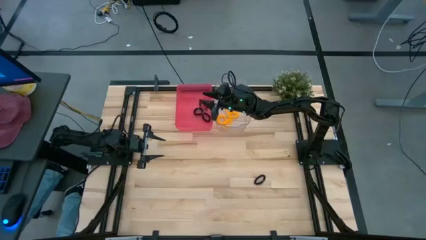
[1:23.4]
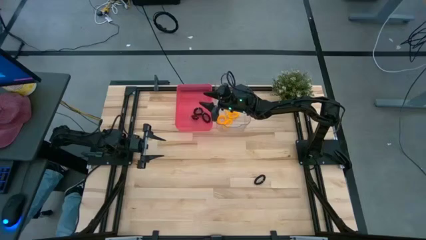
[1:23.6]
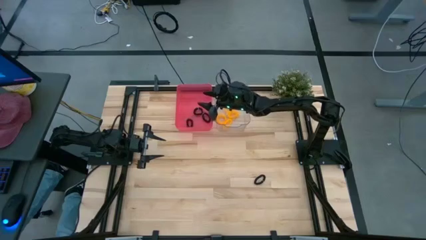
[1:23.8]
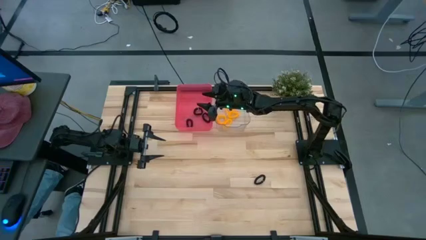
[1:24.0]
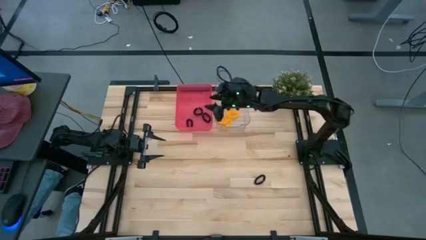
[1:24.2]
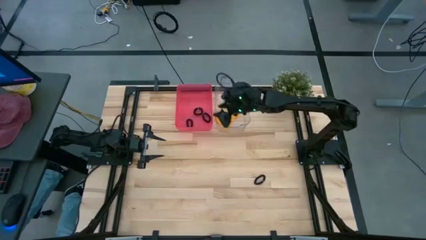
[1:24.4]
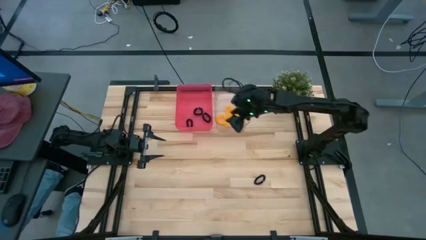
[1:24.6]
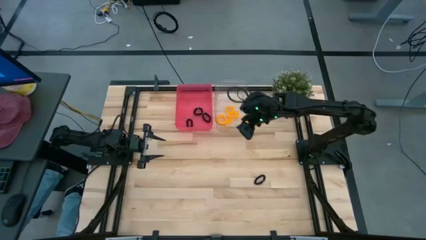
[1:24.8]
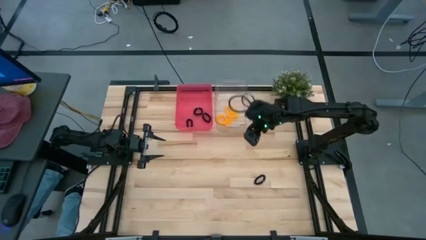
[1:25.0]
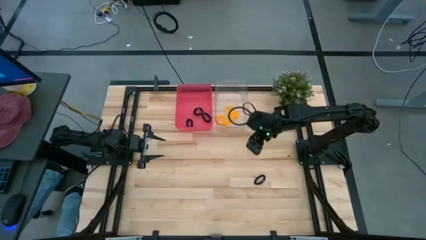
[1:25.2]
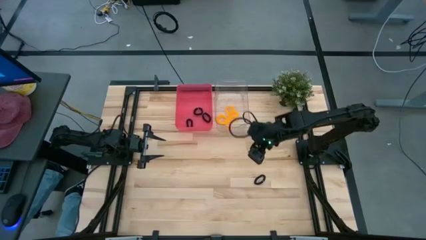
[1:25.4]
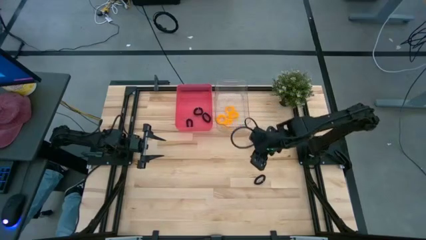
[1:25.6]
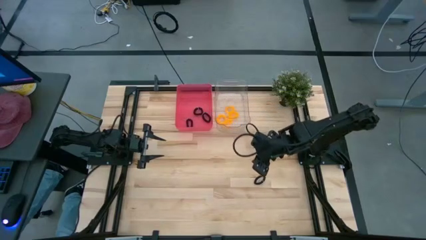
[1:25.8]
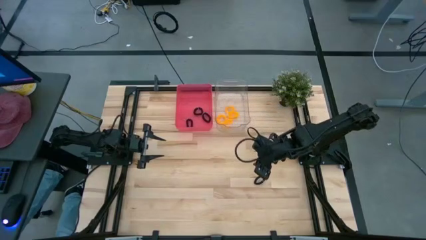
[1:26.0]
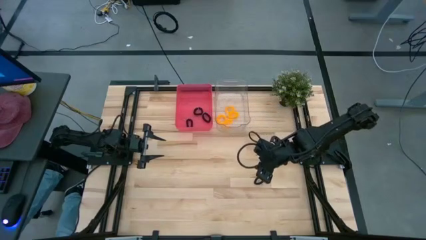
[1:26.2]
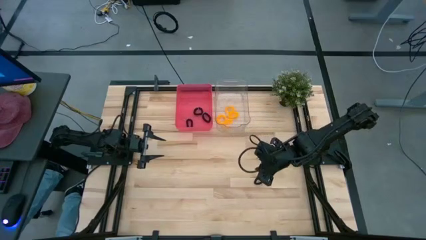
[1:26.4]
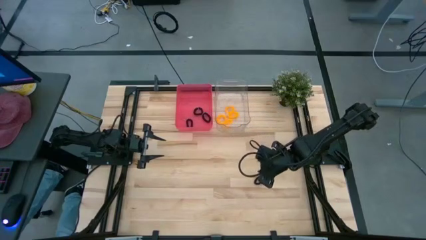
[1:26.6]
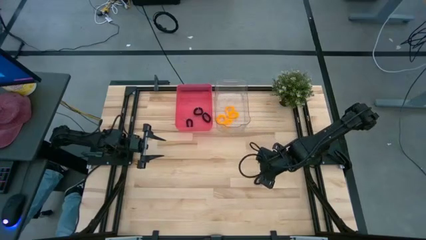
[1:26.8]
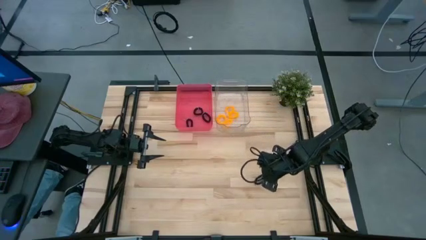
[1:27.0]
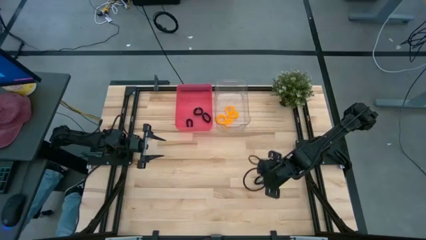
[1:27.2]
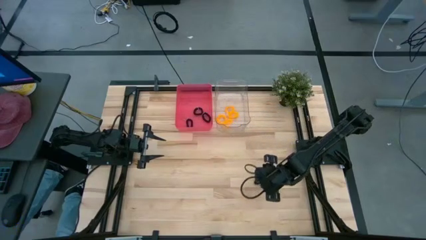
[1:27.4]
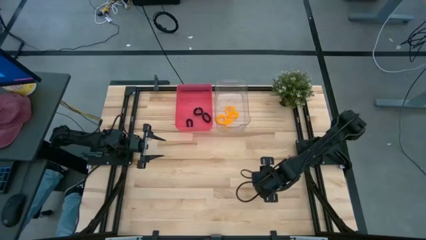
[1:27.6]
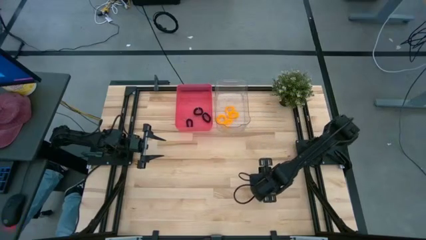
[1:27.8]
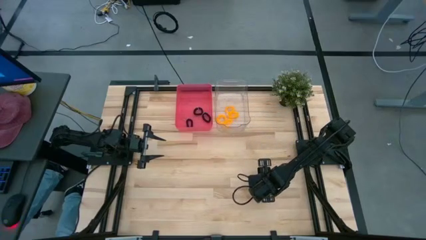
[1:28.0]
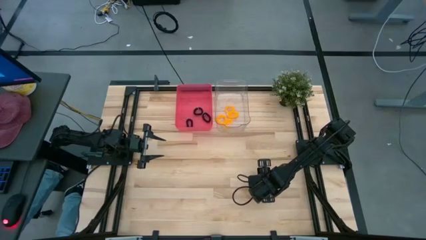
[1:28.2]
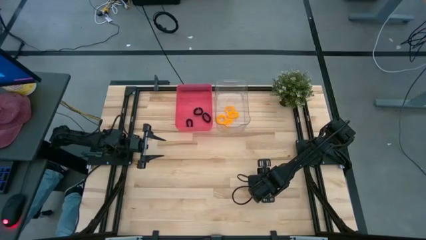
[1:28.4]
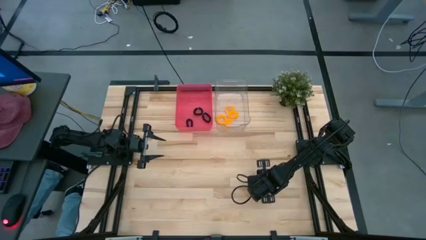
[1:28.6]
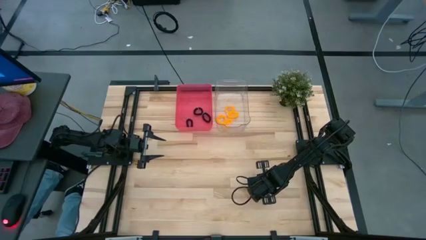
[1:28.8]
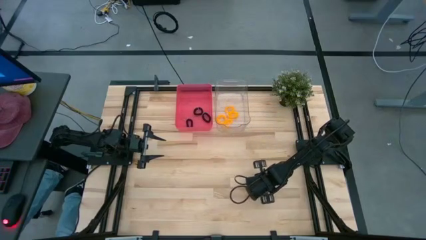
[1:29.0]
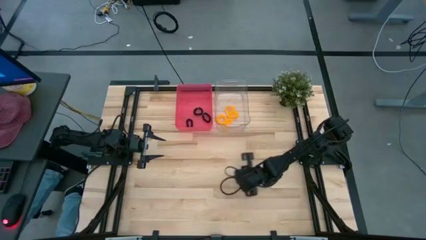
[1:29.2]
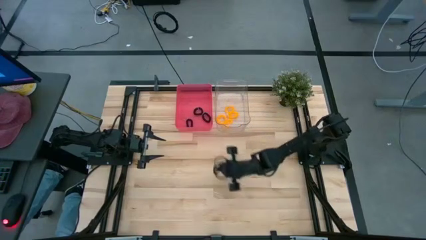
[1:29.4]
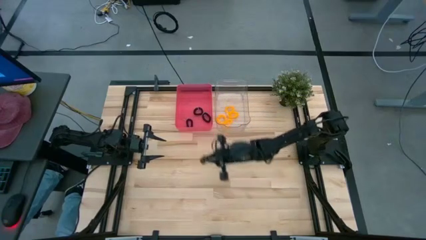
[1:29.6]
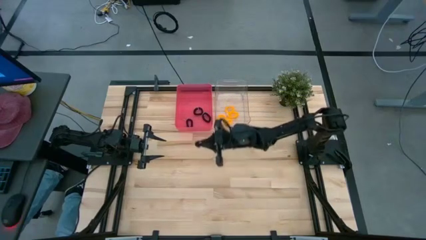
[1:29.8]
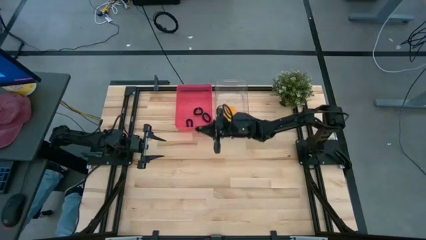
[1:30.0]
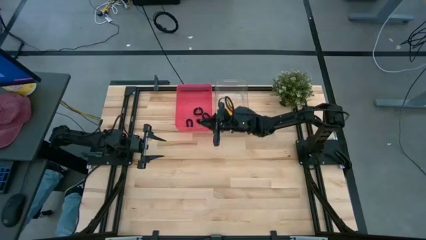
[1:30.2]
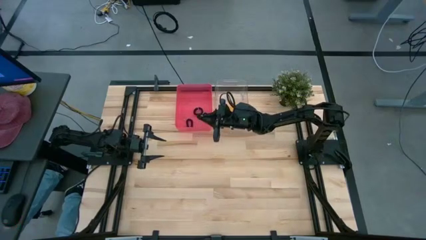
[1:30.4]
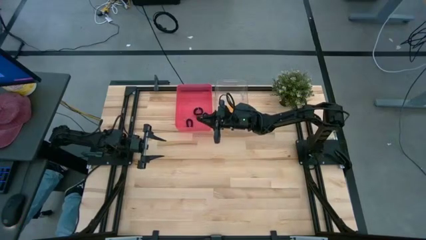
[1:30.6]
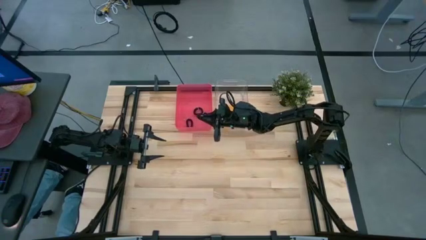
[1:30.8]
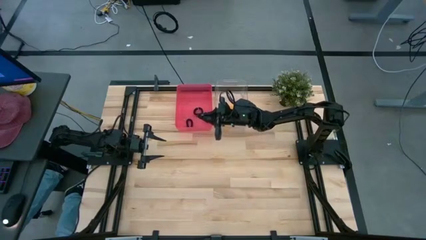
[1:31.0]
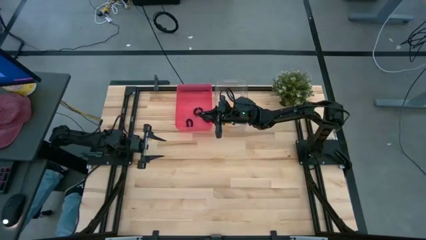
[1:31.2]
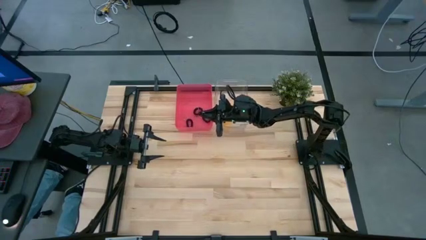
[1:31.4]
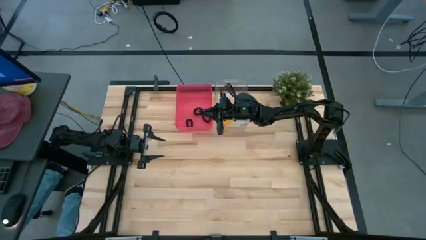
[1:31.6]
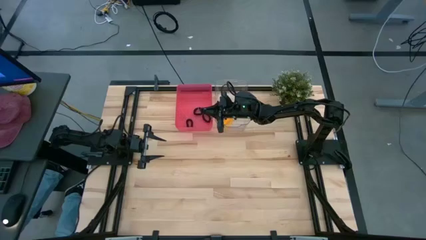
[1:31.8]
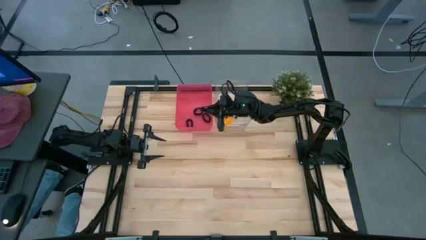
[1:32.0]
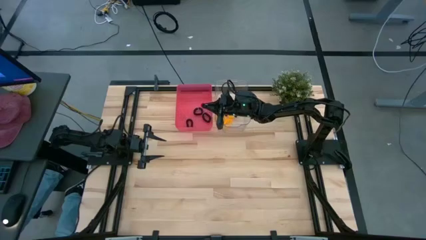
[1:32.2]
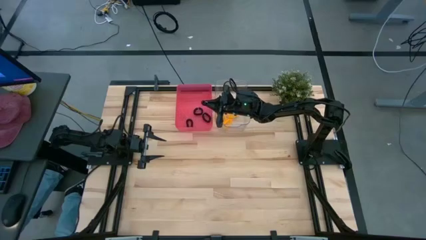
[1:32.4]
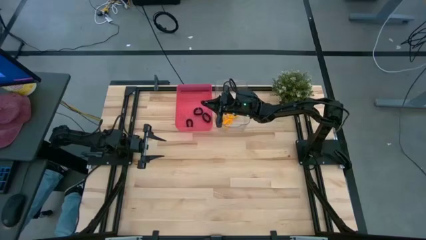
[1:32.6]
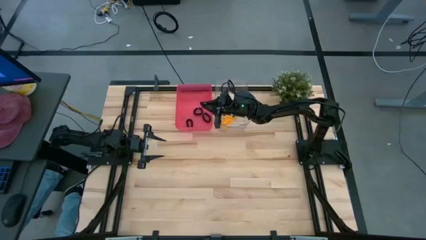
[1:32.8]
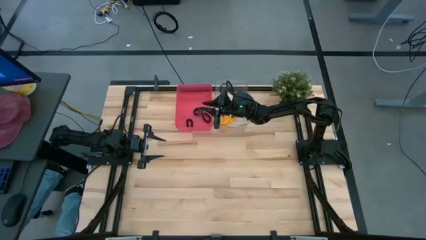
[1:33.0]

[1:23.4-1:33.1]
Task: Sort spring keychains
Put the black spring keychain into the red bin

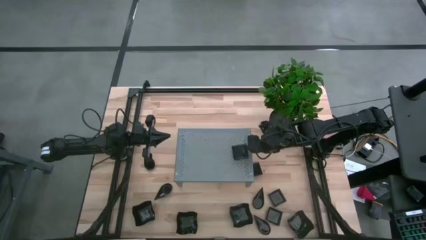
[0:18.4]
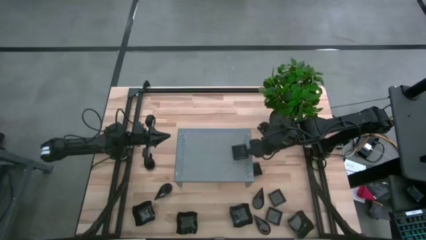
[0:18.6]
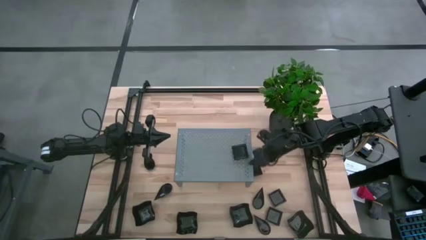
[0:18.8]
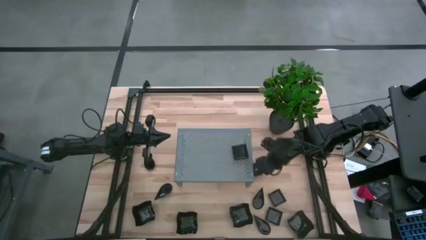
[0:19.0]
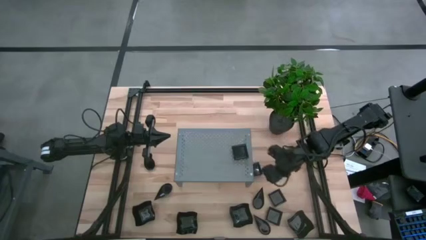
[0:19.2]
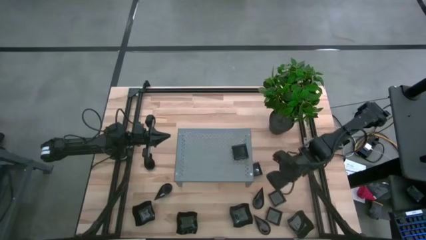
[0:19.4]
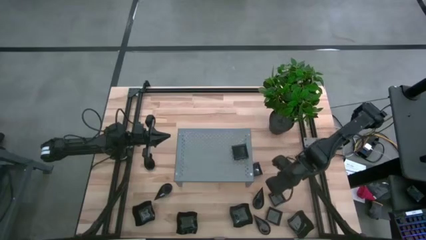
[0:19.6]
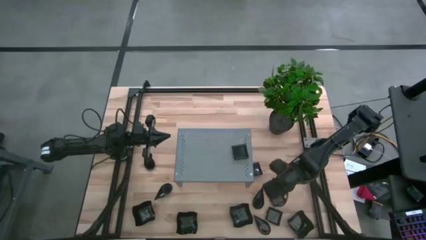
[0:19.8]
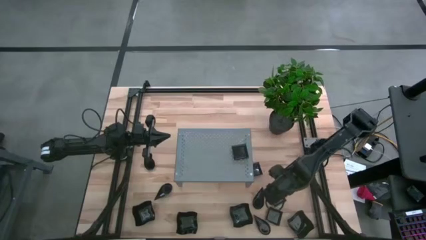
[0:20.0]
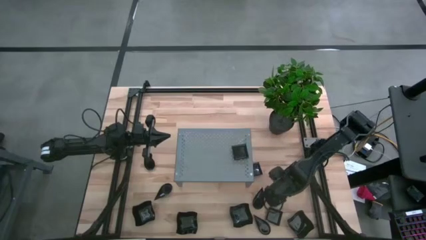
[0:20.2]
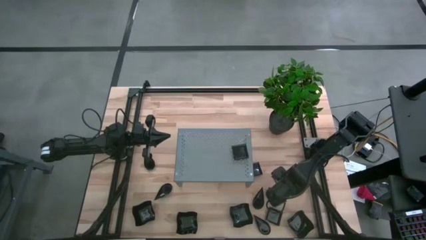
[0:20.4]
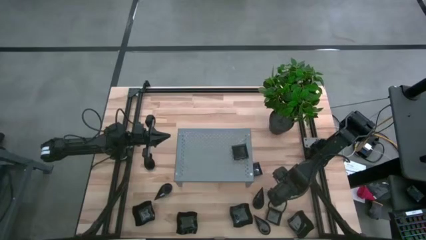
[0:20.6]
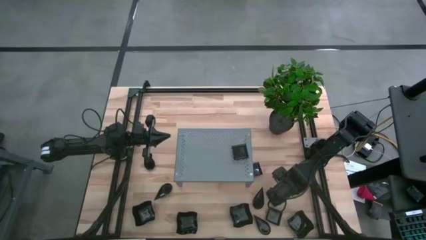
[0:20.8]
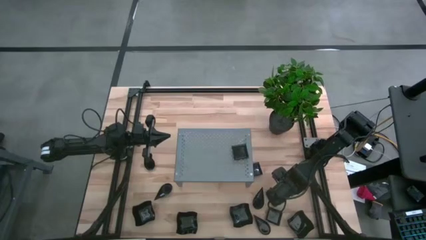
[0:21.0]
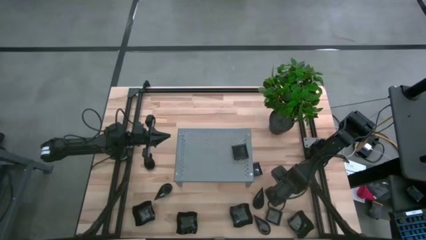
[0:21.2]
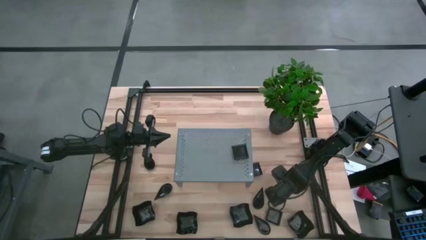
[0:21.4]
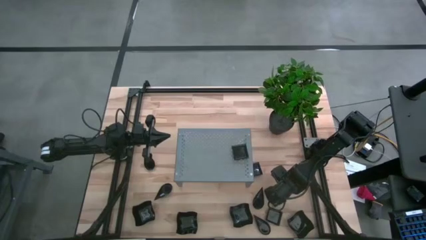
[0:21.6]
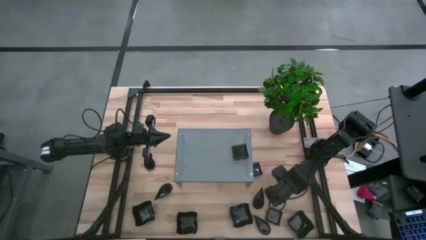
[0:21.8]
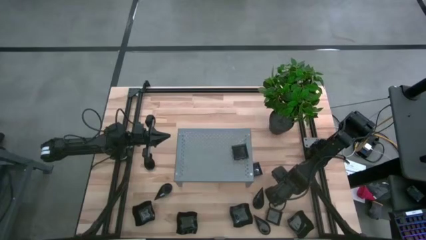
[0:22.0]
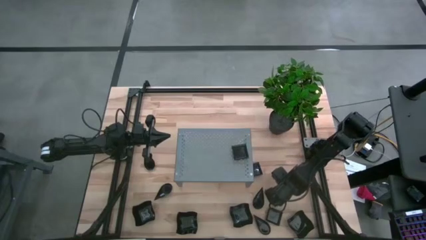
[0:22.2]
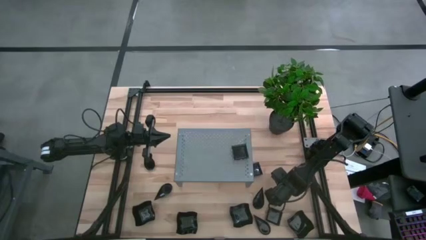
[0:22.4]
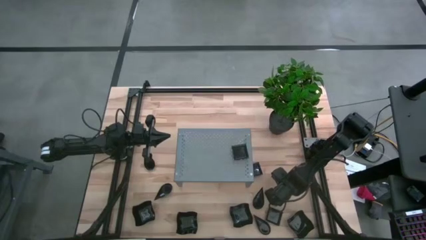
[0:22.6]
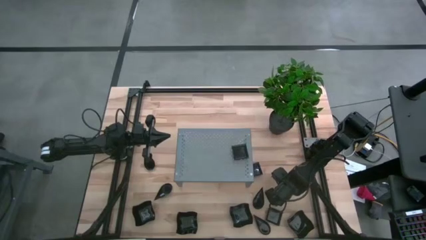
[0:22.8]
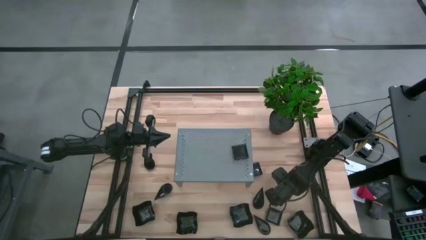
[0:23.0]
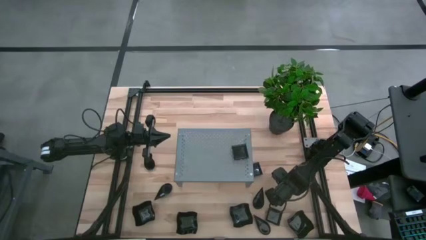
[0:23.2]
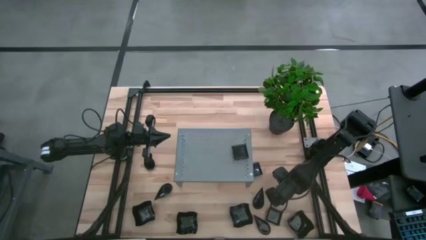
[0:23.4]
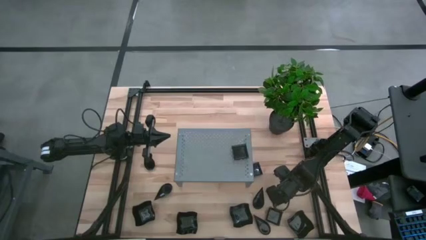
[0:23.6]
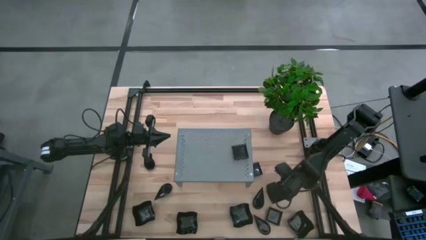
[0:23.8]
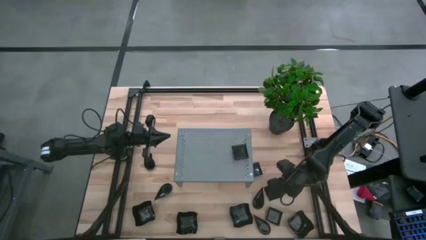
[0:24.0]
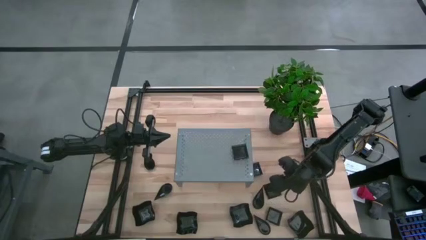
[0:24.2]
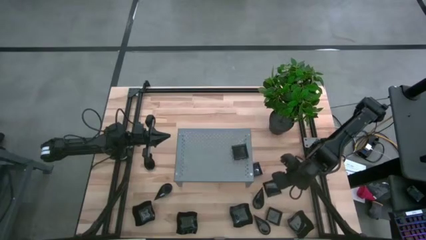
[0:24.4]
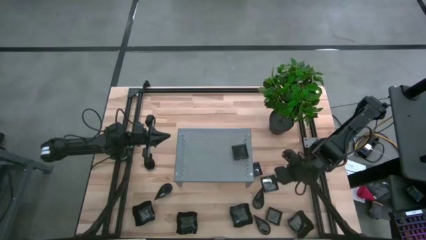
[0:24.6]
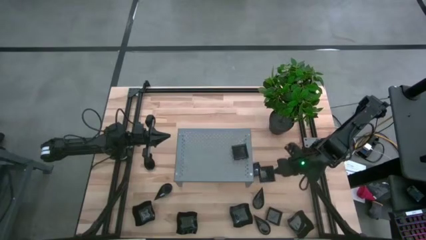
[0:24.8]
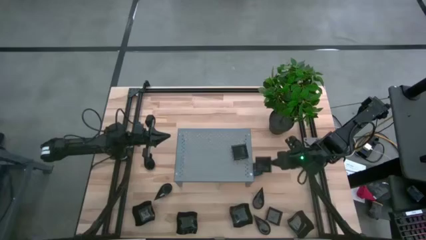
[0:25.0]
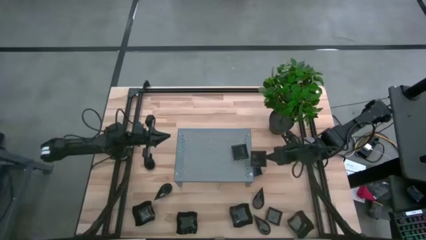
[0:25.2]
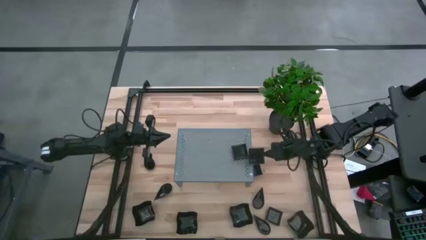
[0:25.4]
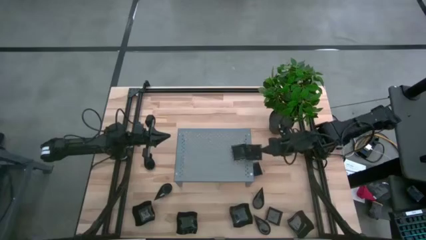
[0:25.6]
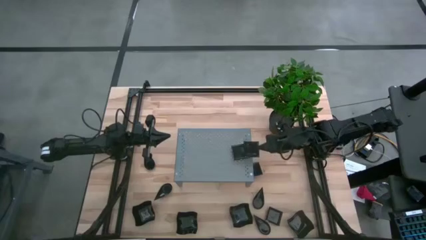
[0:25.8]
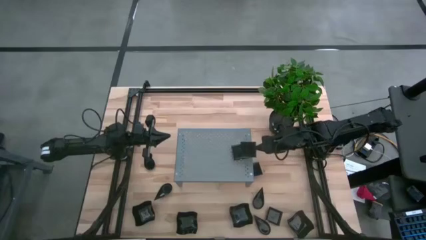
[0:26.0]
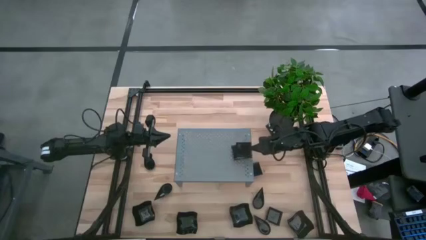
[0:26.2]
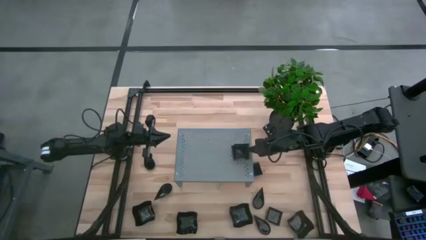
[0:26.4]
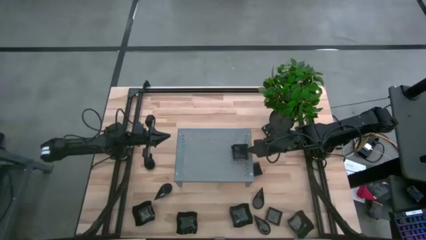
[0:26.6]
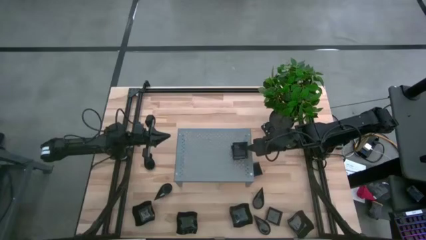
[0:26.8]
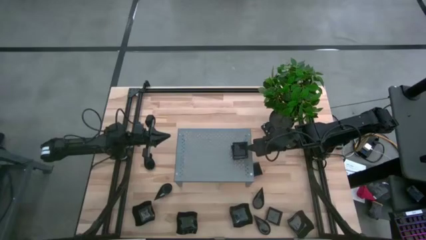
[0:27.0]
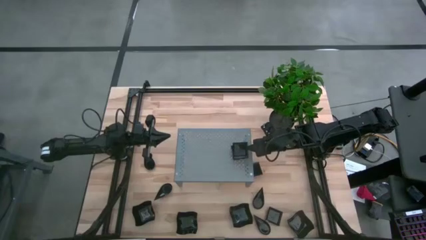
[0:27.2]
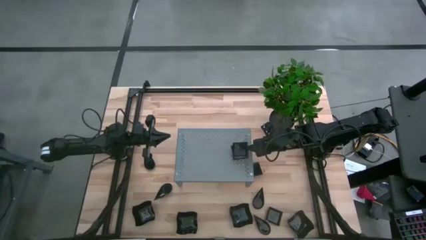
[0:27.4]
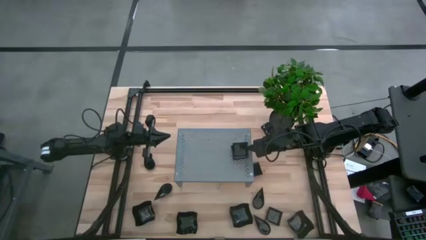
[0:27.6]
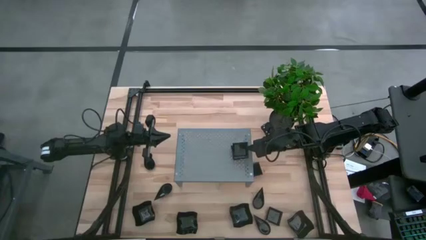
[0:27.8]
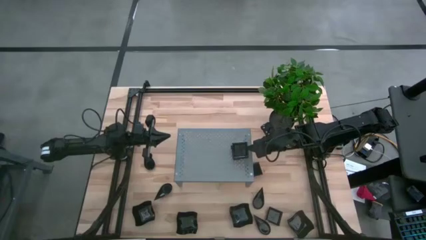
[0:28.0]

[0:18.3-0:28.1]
Task: Pick & Place Mini shaped plates
Stack the black square plate on the black square plates on the shelf
